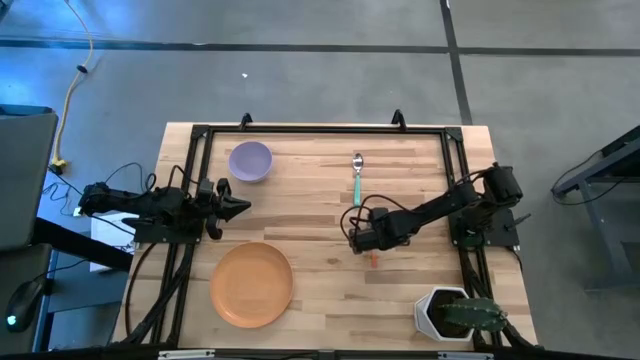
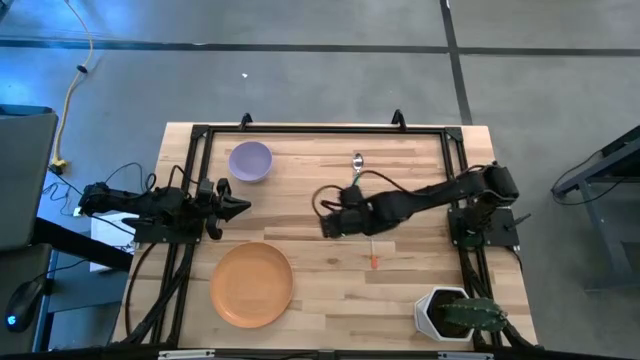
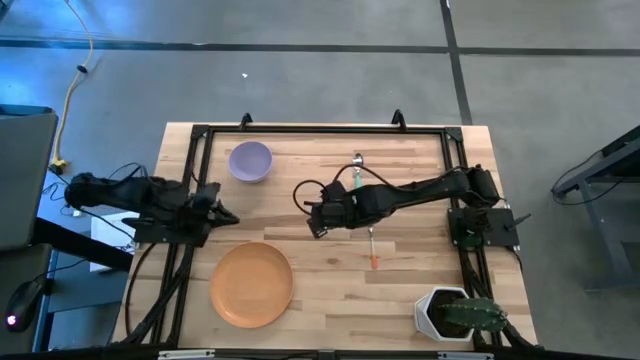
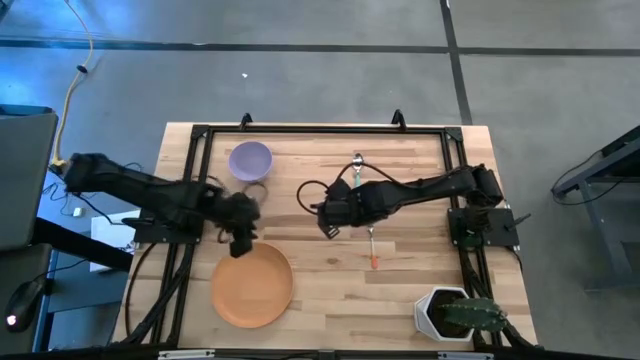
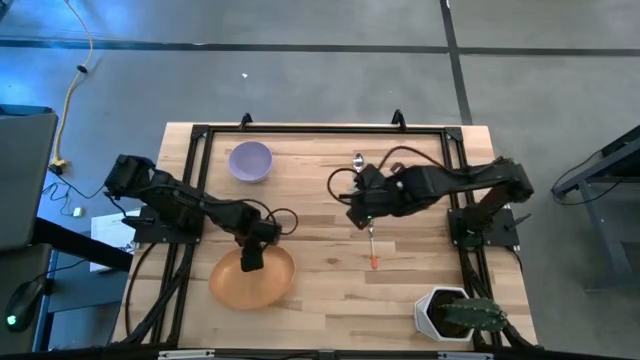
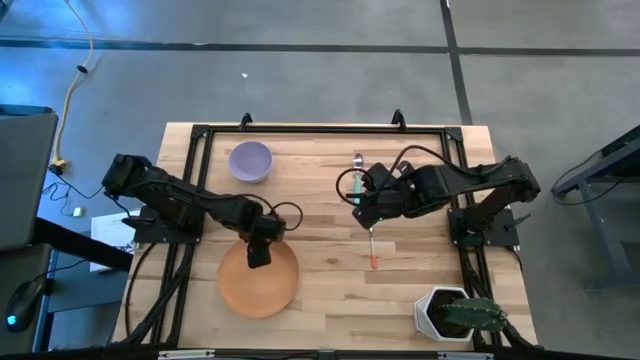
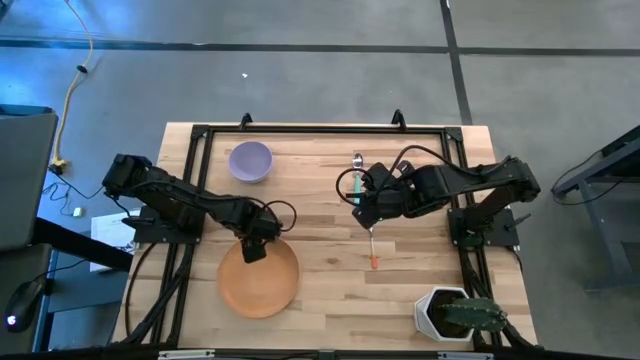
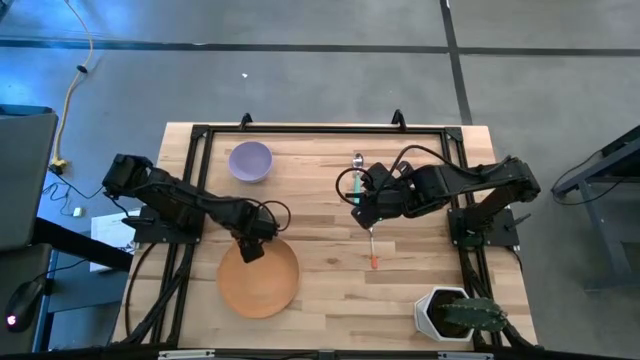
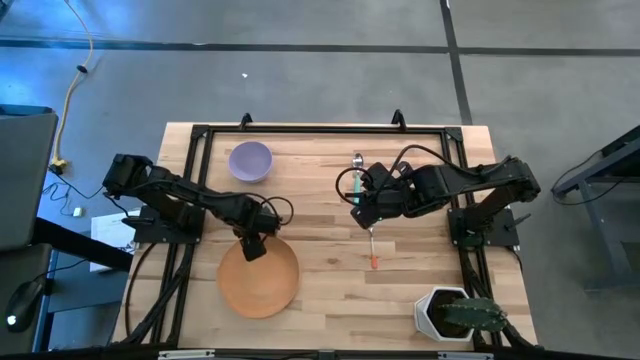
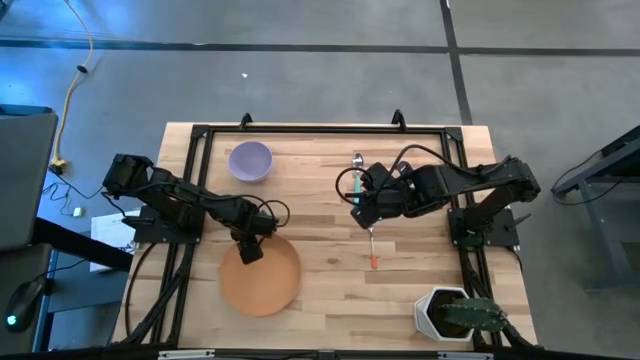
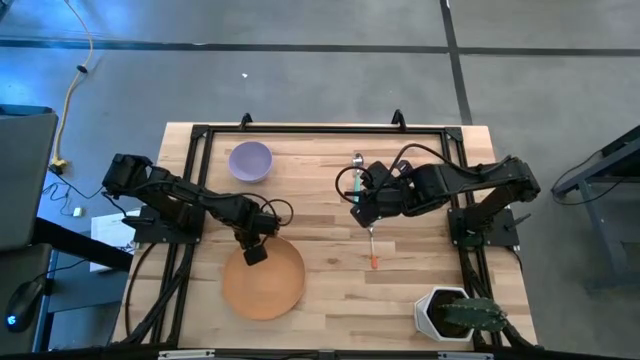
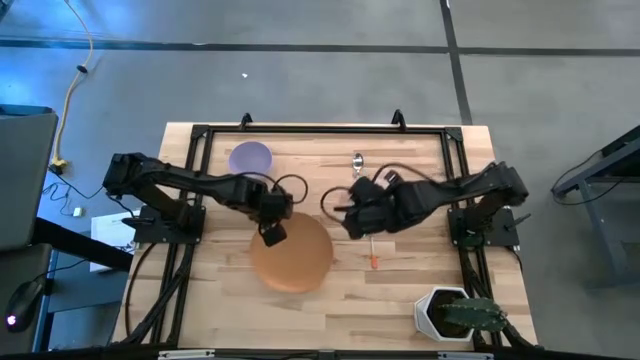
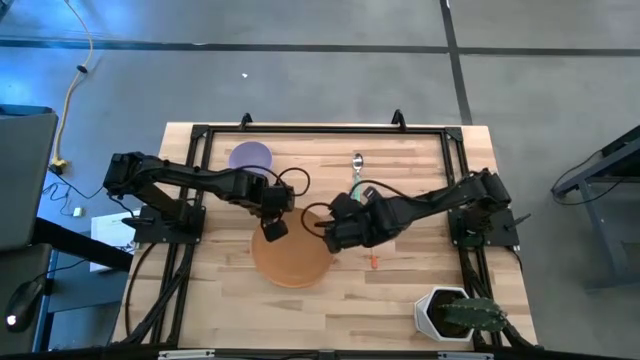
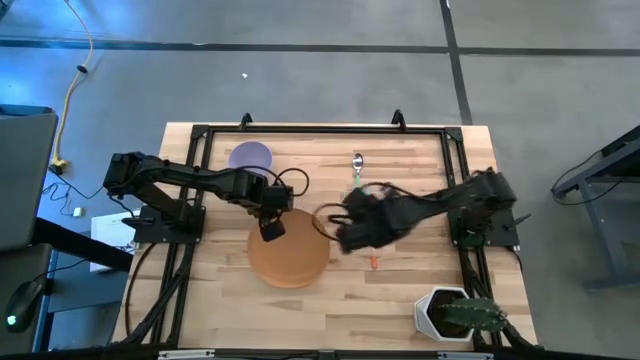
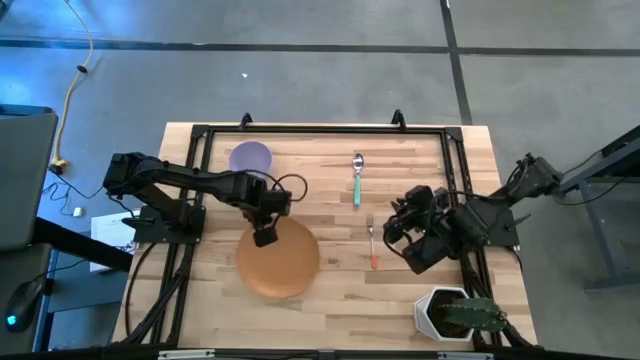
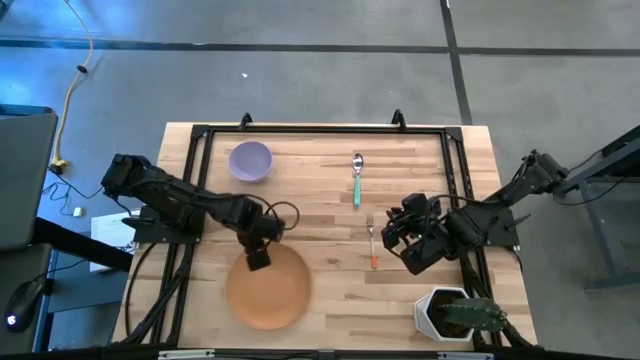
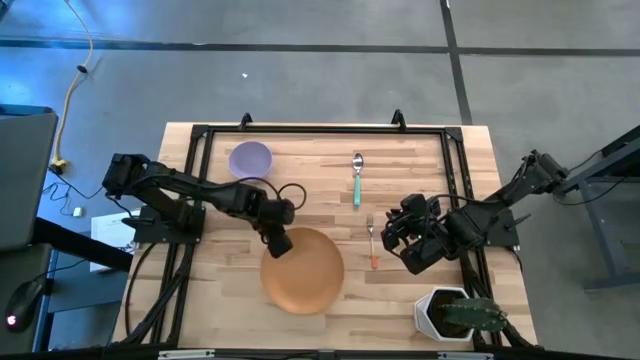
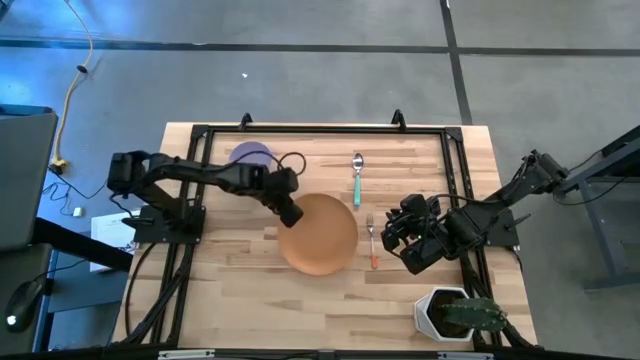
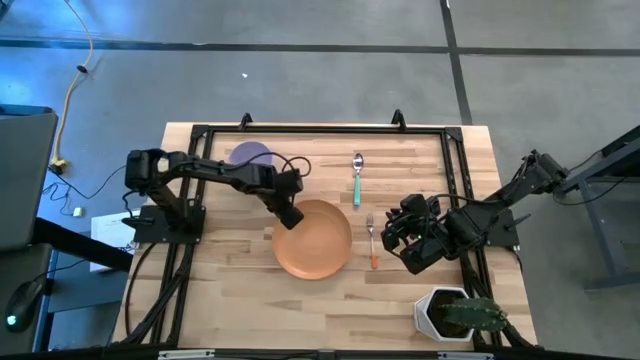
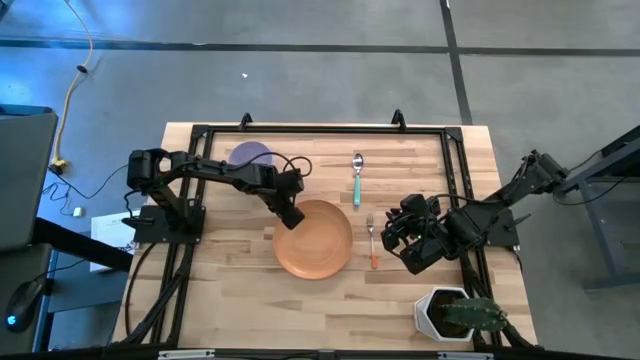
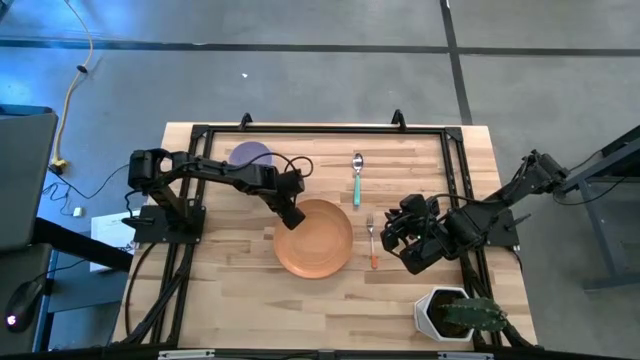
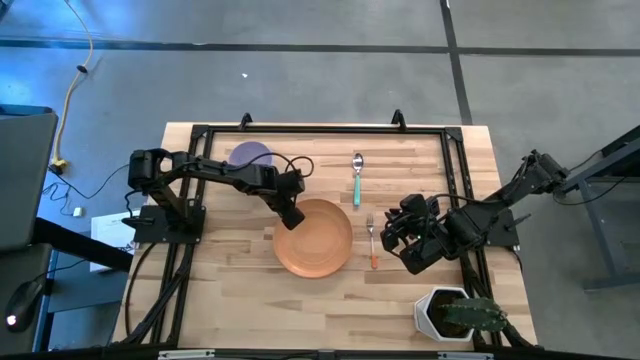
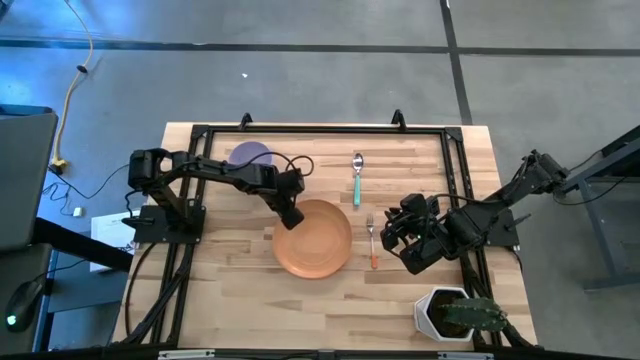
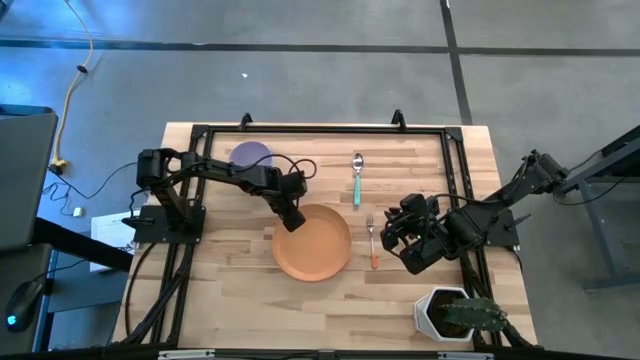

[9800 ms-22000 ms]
Task: Set table place
Put the orange plate to the left of the orange fork

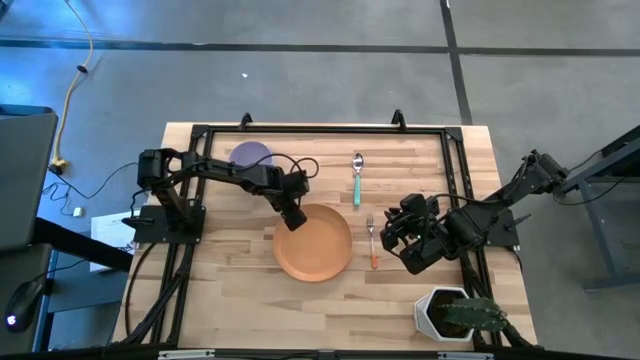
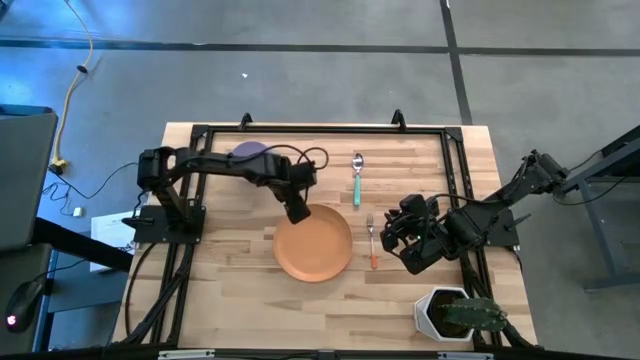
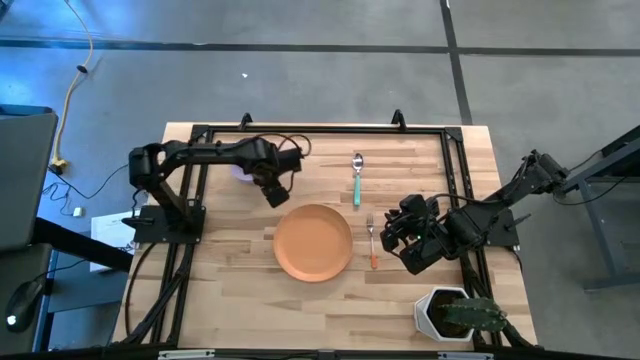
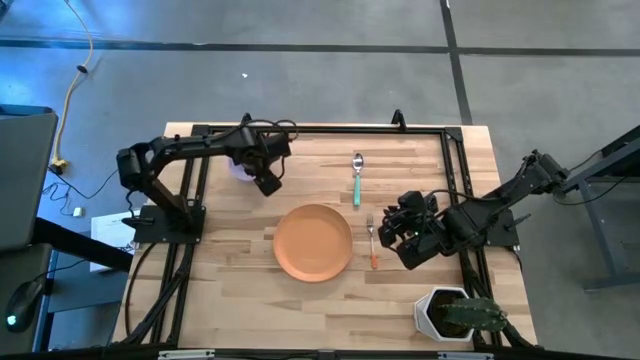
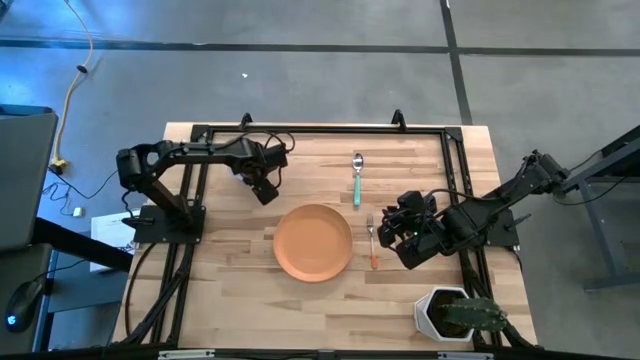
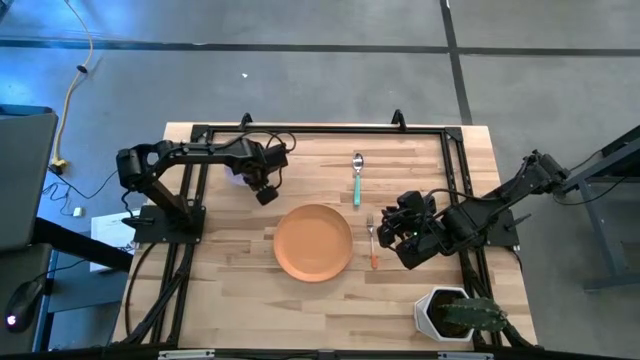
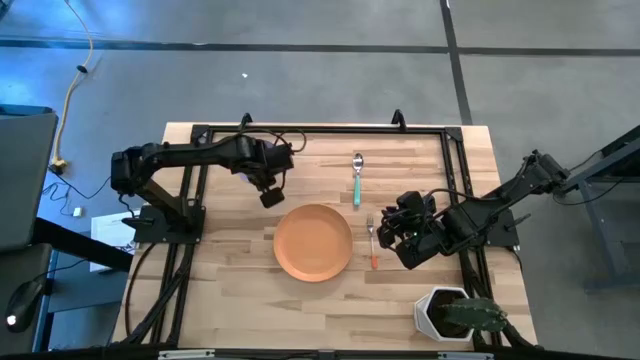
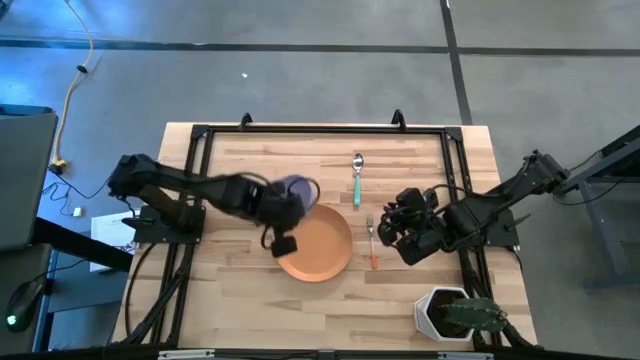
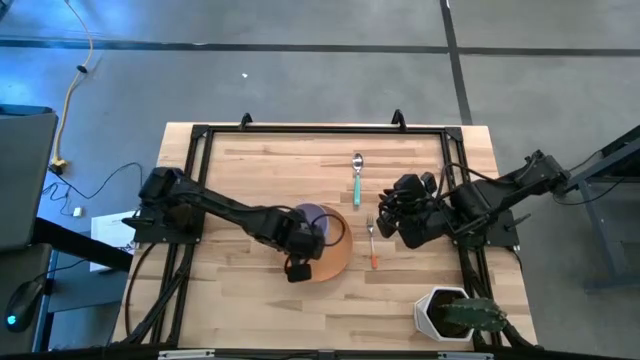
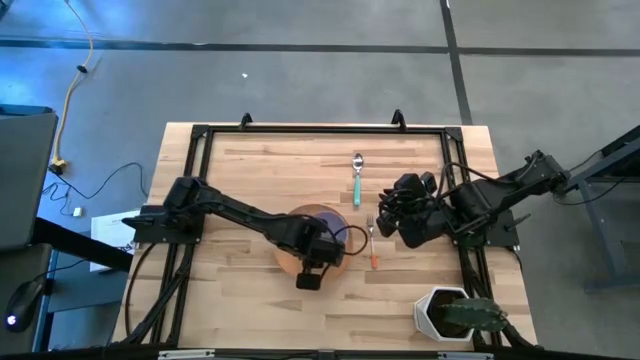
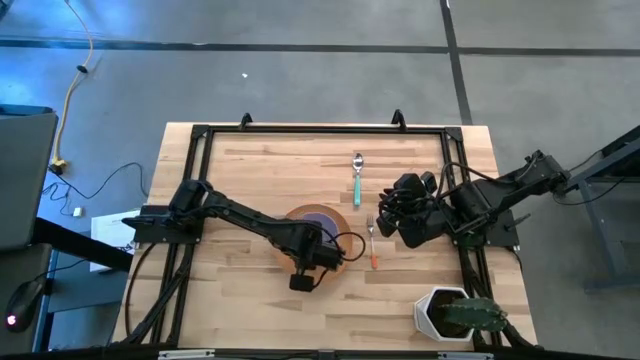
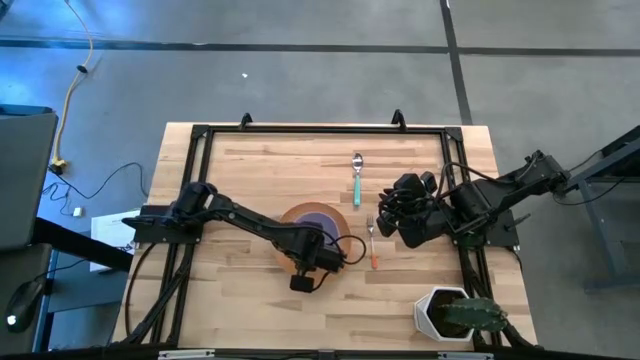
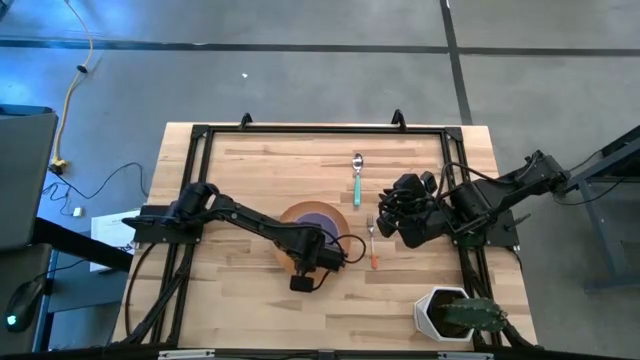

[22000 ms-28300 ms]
Put the purple bowl on top of the orange plate

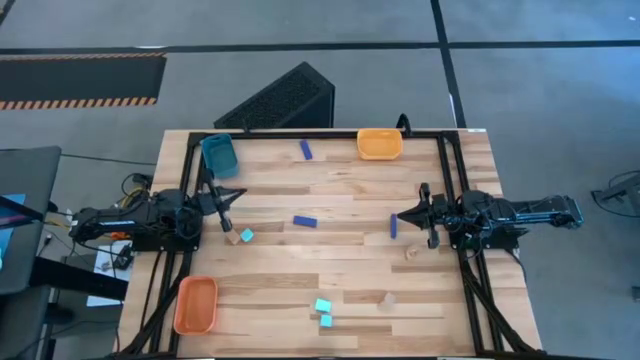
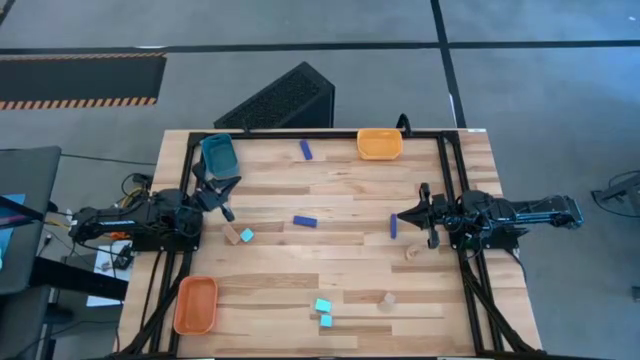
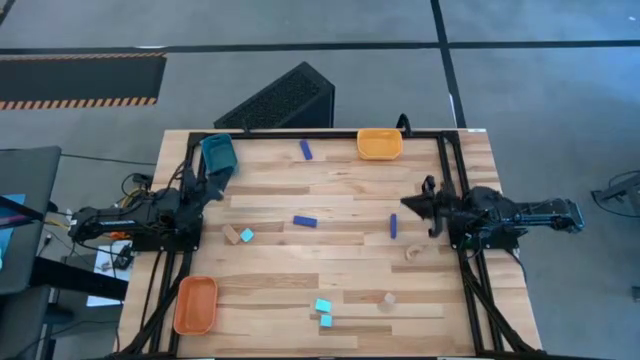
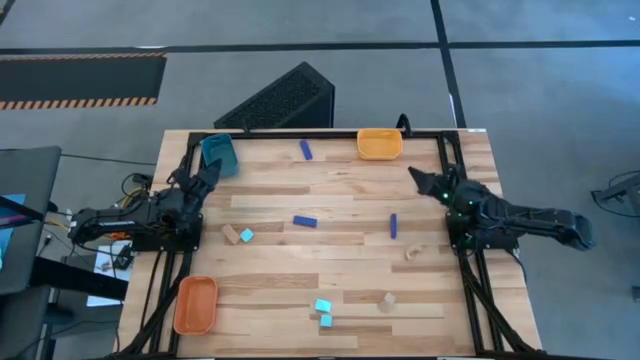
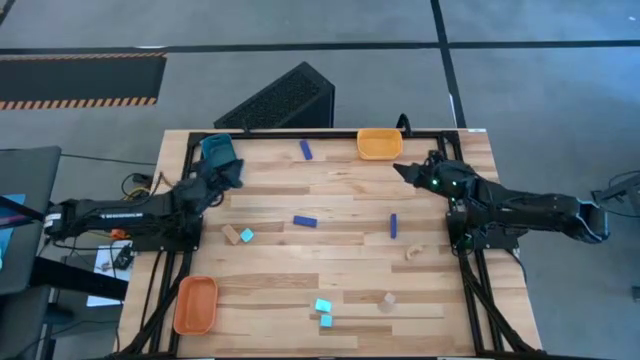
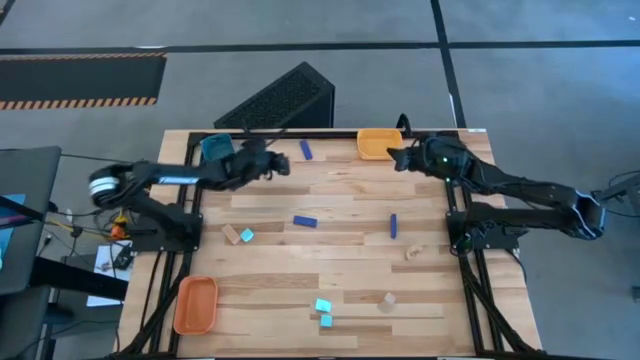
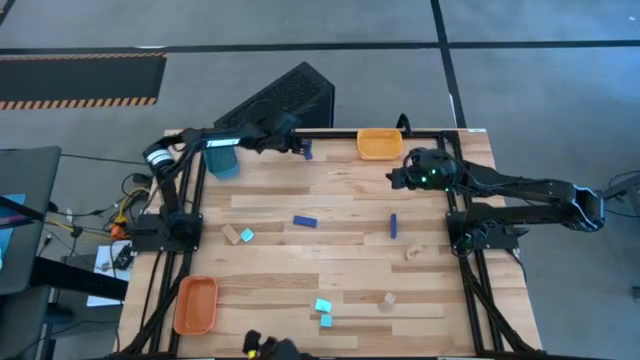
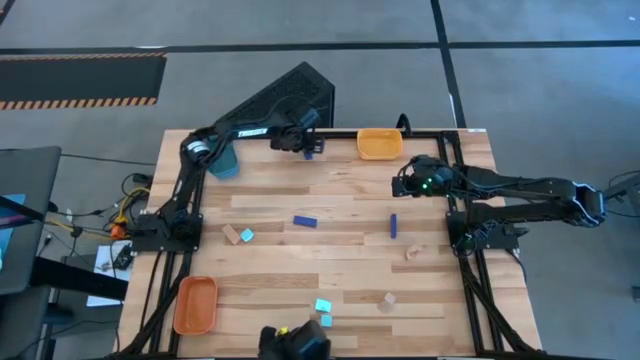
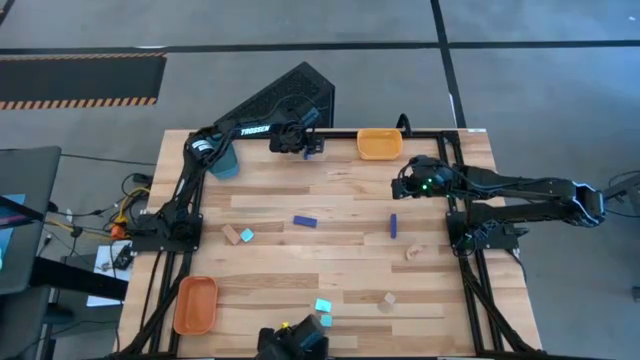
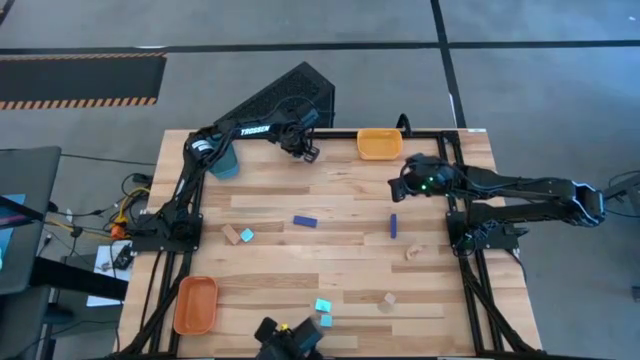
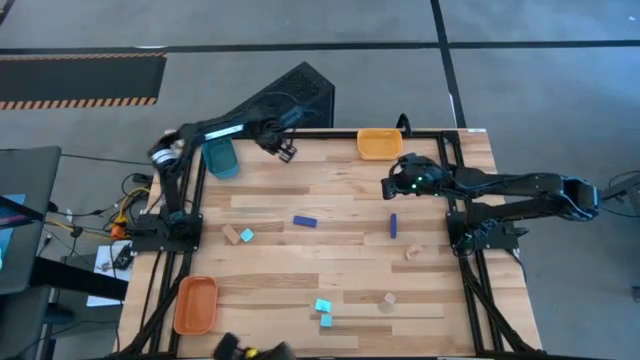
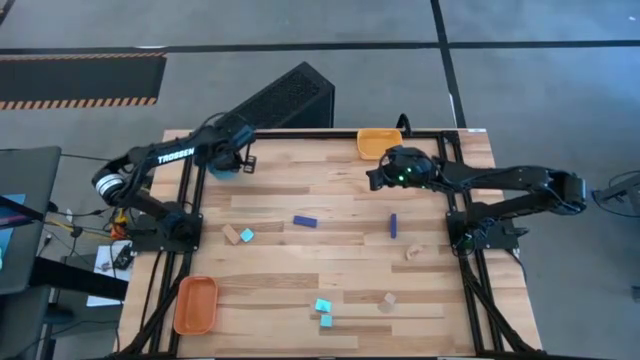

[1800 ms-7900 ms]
Task: Sort & place blocks by color
Put the top blue block into the green bin
